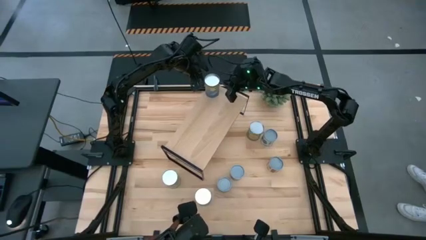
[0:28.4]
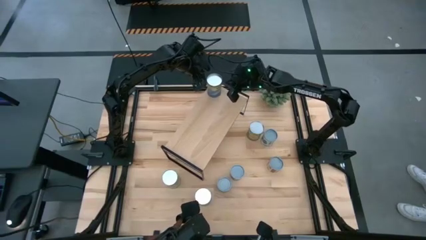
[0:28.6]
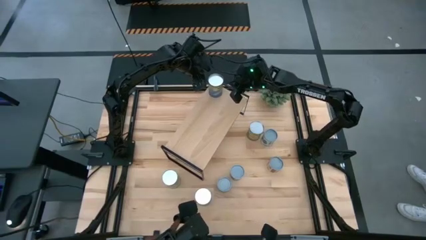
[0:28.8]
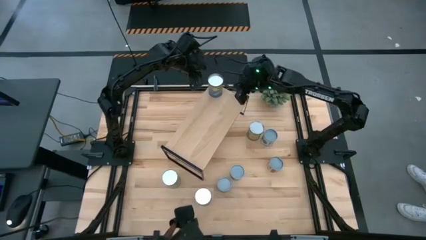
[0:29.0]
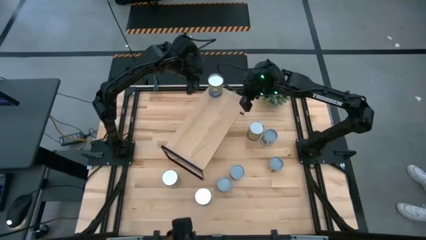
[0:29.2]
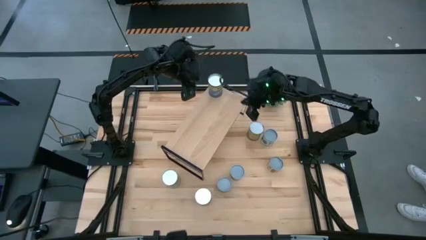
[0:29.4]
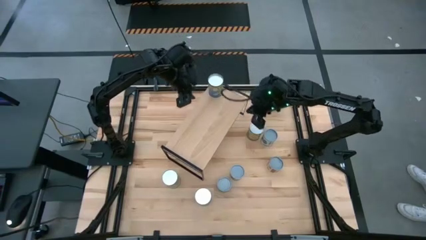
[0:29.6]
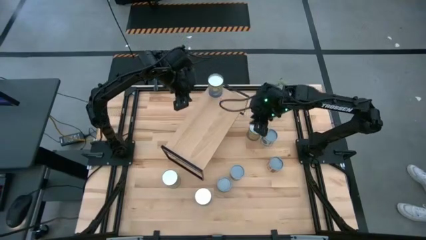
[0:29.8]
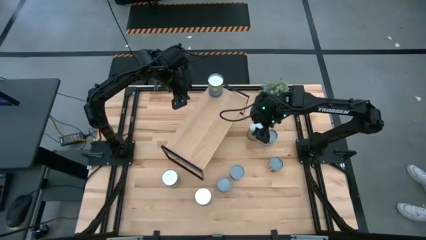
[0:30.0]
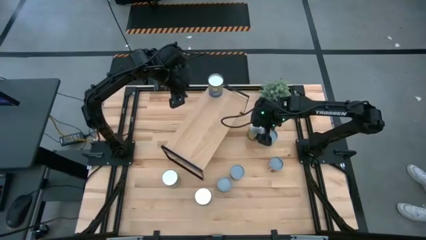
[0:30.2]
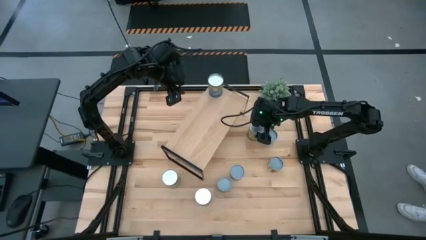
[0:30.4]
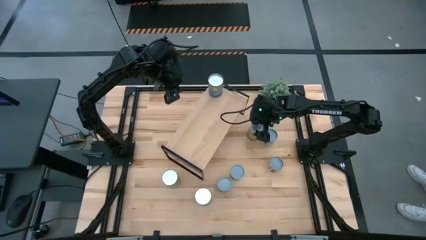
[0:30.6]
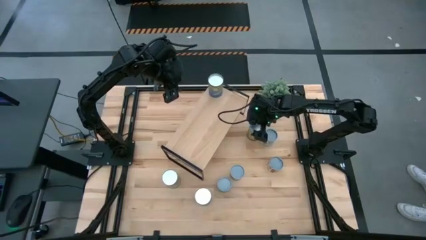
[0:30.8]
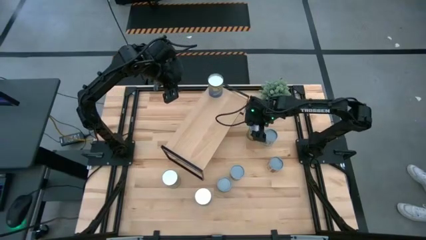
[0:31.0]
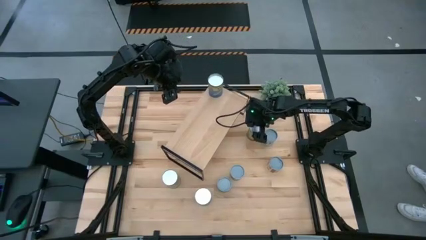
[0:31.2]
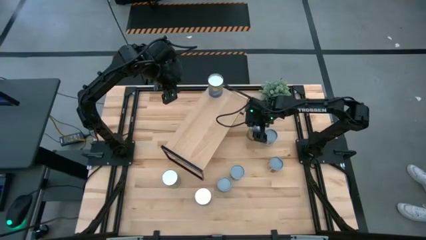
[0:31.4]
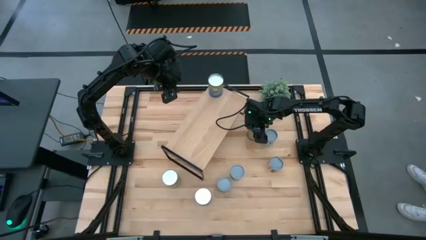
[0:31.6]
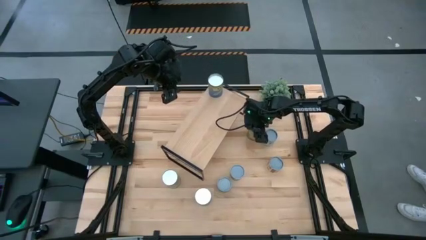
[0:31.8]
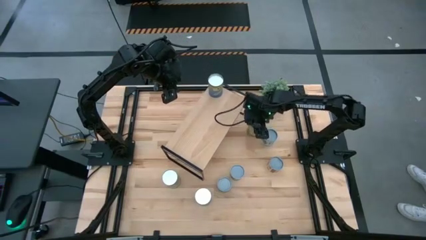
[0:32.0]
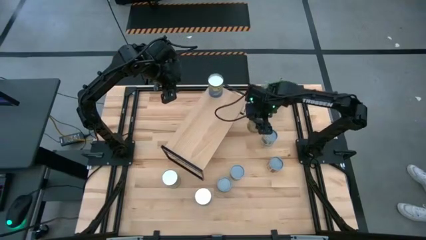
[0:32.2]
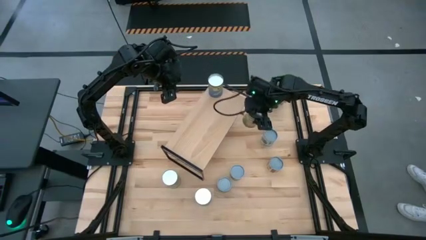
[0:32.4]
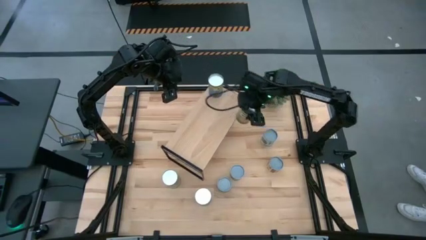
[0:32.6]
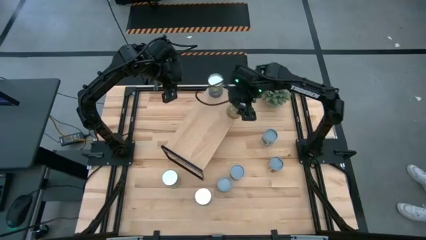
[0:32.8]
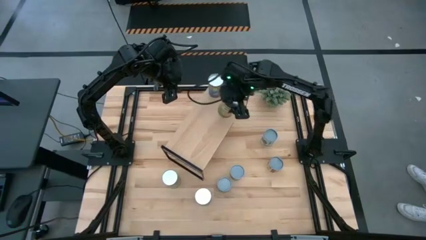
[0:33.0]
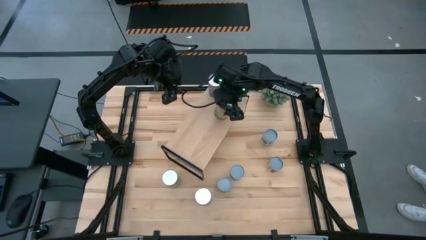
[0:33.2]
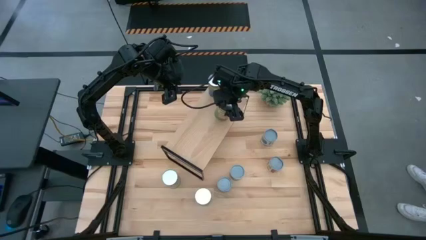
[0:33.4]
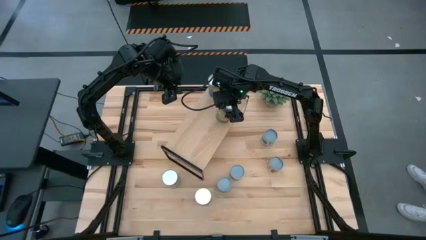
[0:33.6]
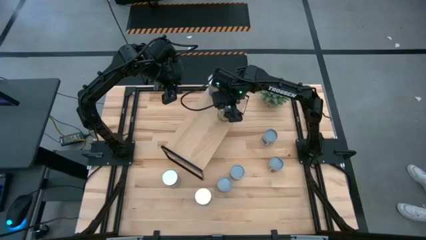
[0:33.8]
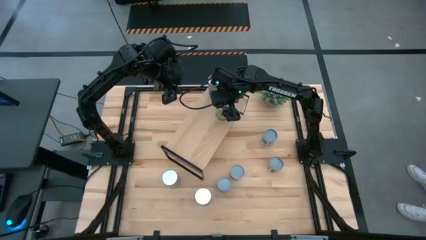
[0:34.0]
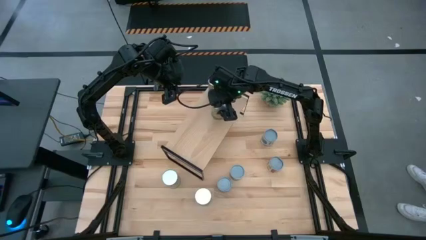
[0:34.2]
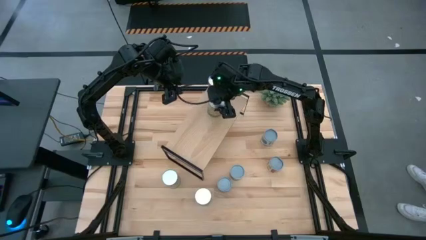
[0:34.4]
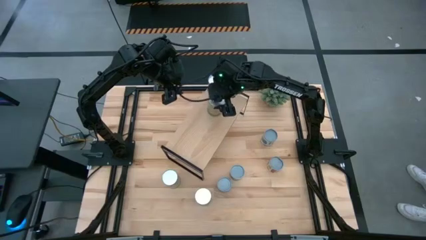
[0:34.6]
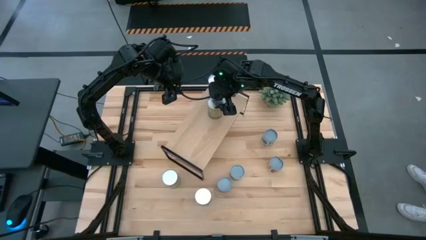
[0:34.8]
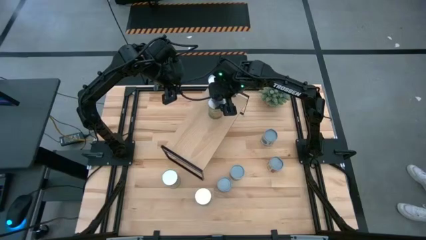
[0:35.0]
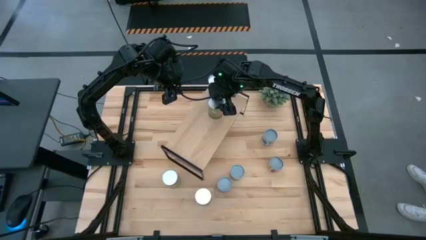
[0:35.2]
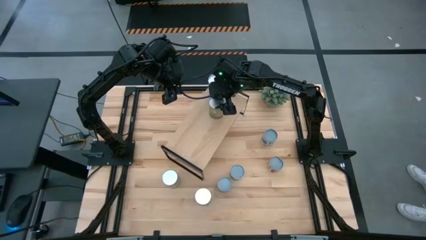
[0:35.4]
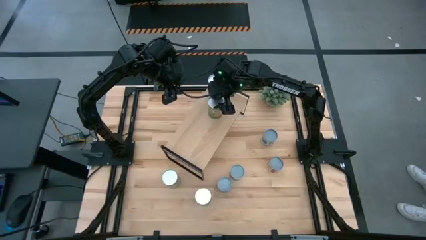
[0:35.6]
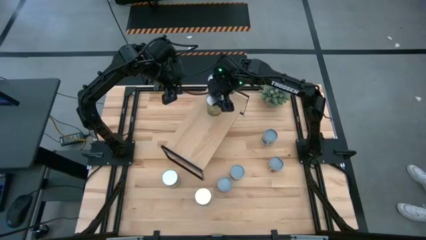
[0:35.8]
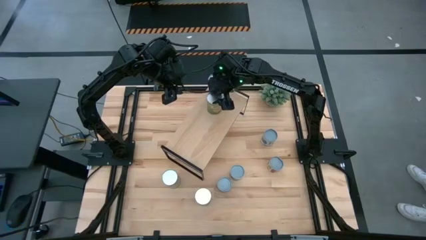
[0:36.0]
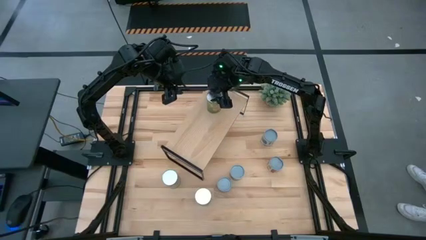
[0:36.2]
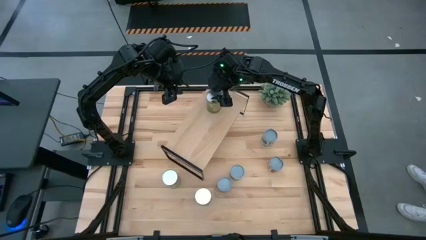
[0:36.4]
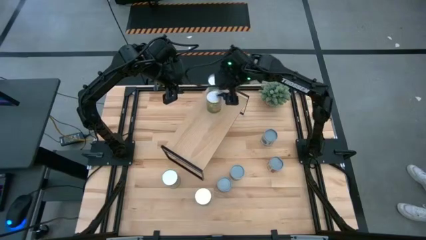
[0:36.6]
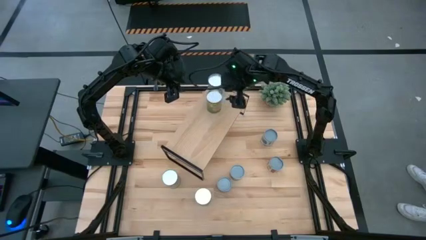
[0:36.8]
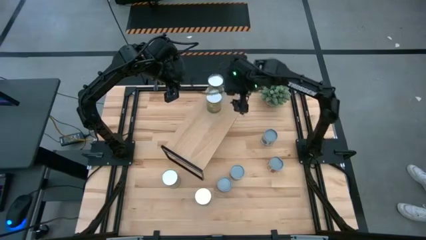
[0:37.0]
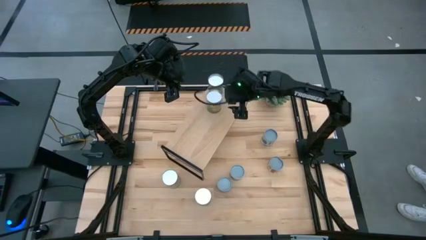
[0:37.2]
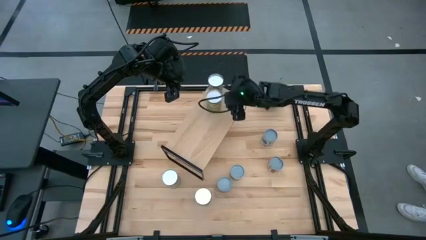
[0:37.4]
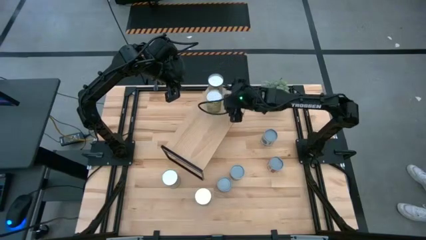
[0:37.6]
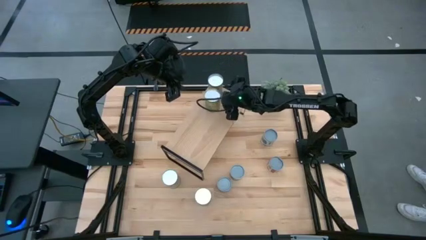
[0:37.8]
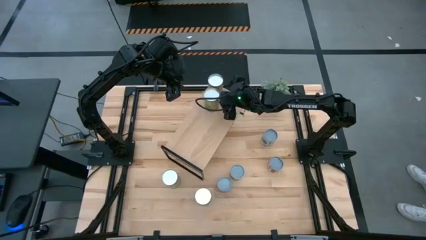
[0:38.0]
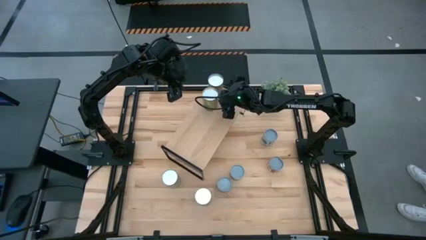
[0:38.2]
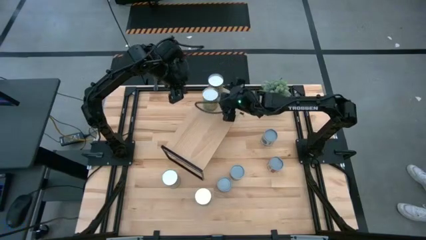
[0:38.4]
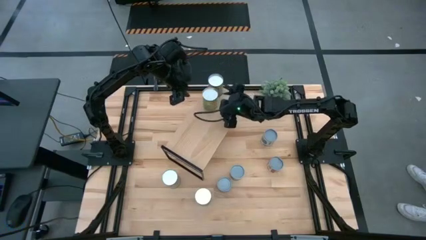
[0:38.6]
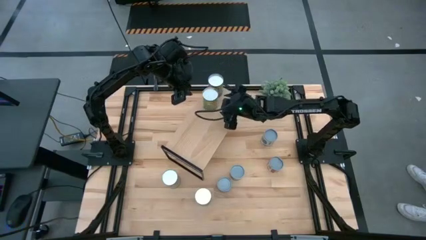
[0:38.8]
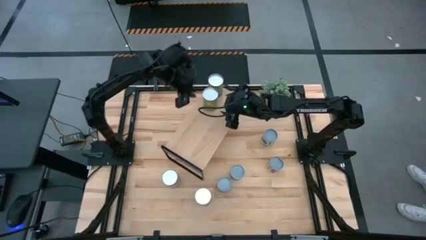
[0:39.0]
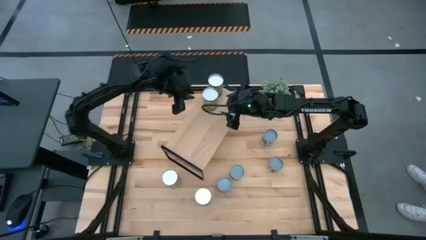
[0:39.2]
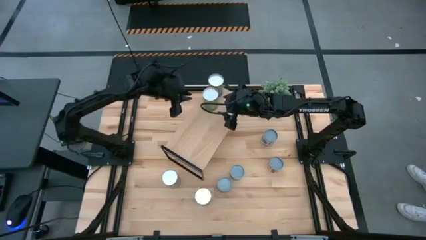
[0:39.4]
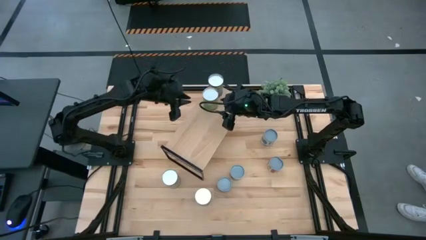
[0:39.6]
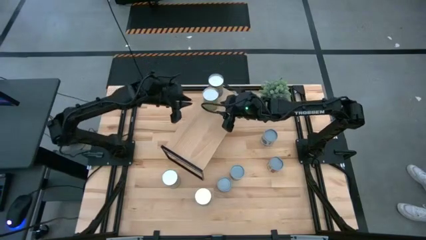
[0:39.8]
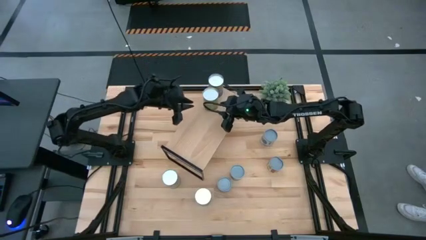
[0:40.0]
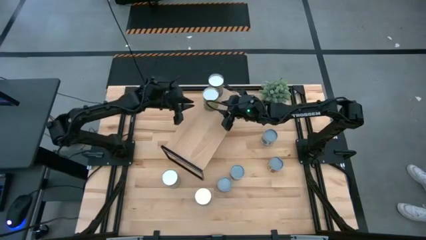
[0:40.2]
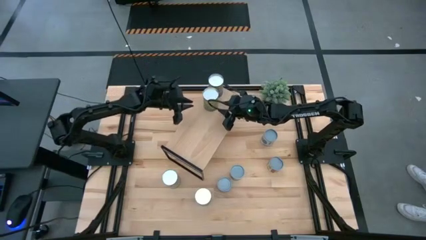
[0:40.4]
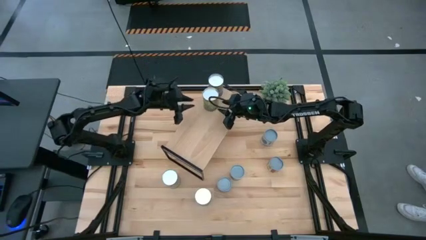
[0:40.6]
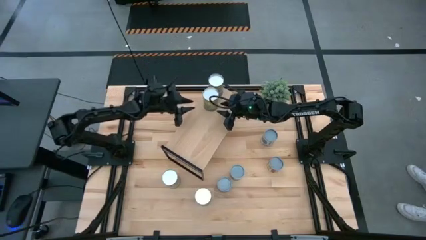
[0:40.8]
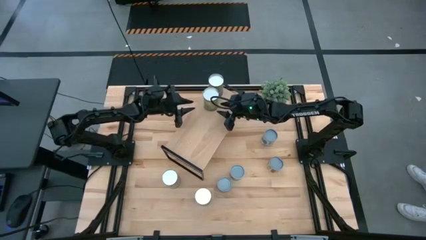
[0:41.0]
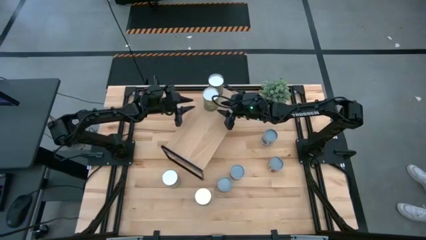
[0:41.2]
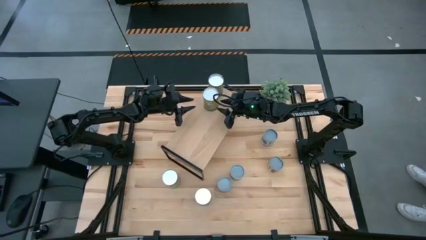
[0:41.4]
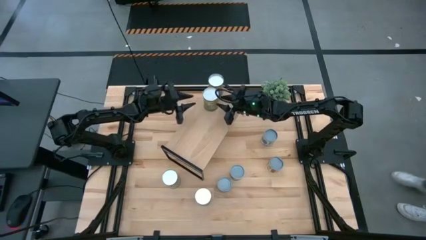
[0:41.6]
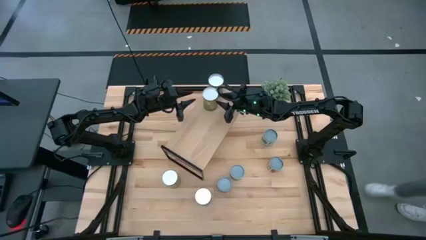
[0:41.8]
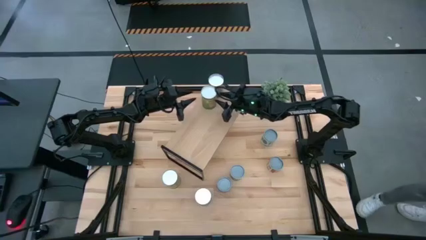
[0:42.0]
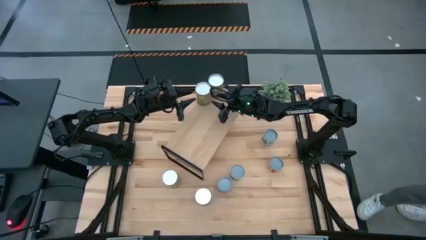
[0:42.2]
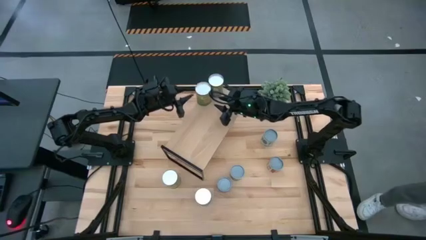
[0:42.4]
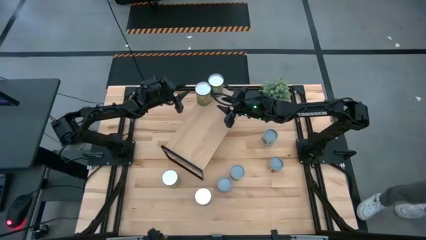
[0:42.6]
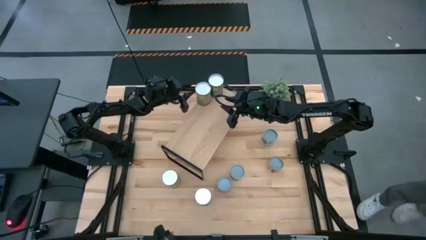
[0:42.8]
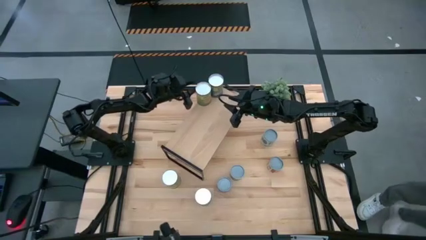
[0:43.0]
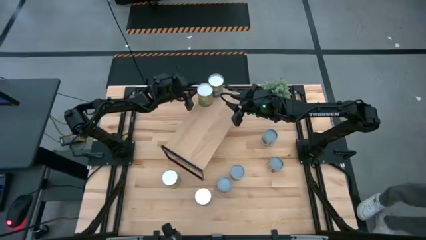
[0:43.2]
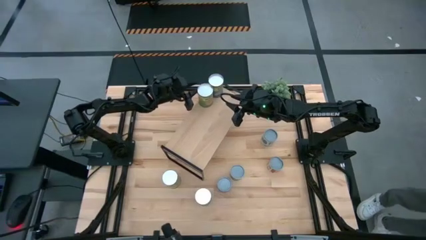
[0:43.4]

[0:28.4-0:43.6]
Task: Pick and place cans onto a shelf
Put the canned oranges on the shelf
